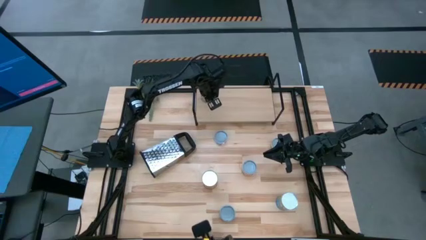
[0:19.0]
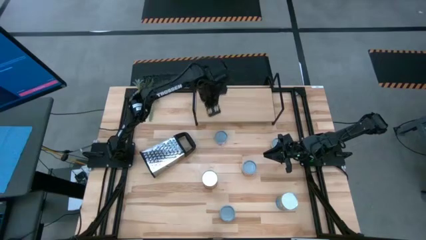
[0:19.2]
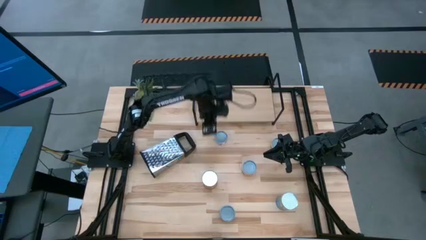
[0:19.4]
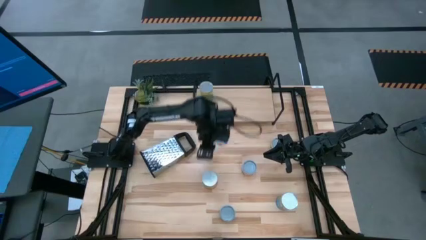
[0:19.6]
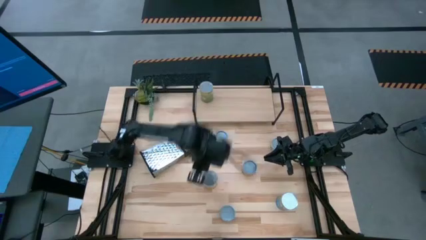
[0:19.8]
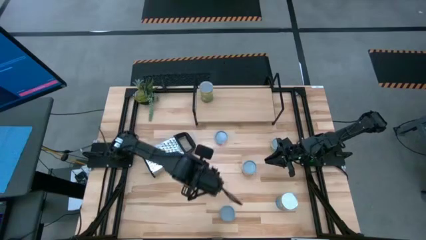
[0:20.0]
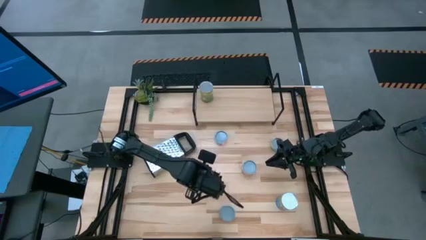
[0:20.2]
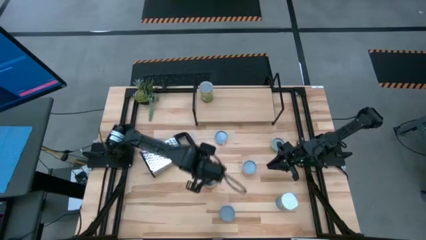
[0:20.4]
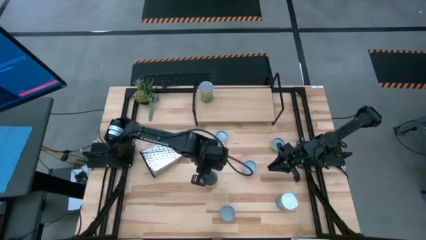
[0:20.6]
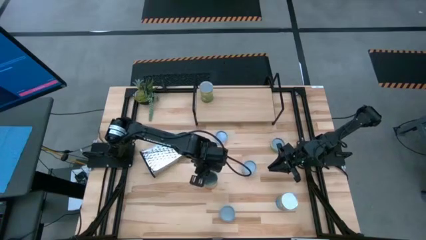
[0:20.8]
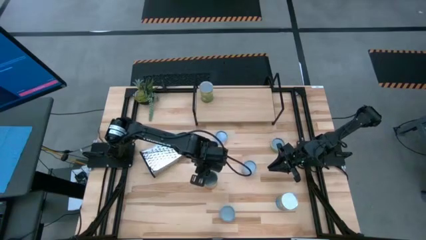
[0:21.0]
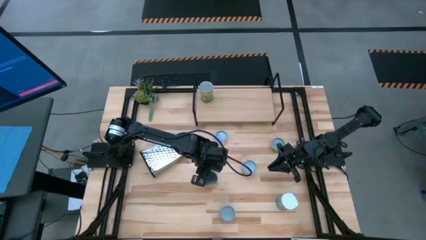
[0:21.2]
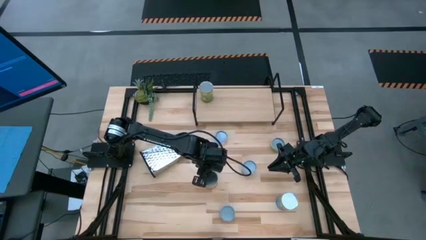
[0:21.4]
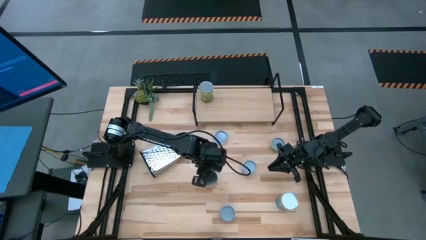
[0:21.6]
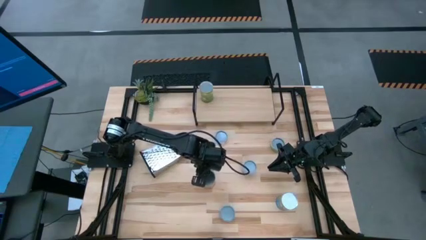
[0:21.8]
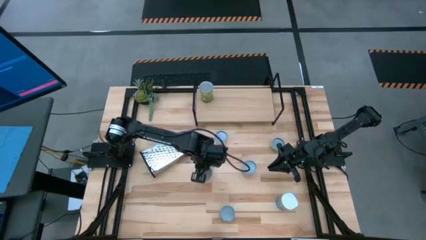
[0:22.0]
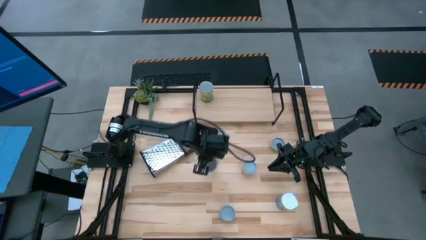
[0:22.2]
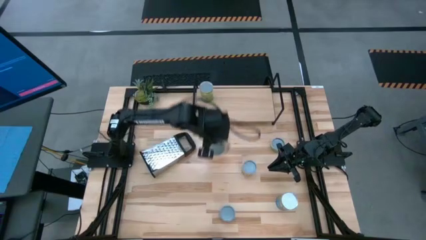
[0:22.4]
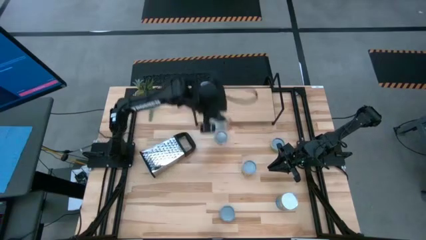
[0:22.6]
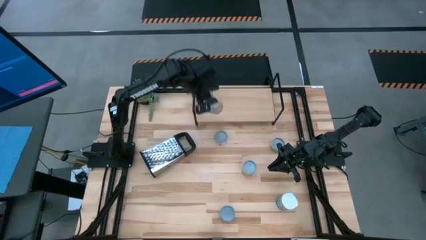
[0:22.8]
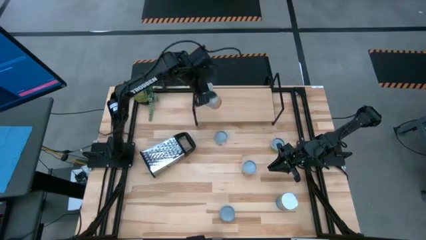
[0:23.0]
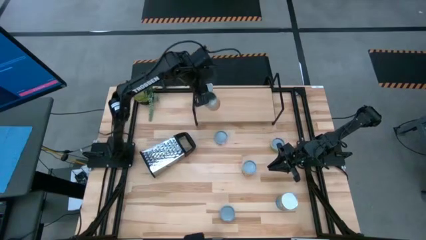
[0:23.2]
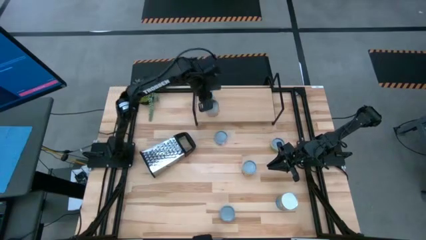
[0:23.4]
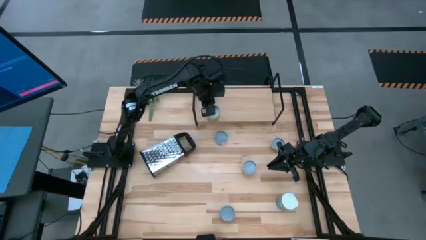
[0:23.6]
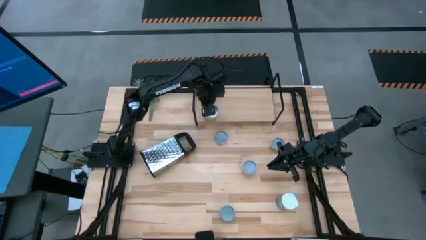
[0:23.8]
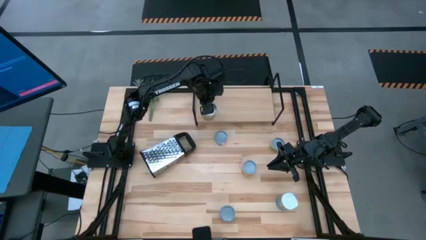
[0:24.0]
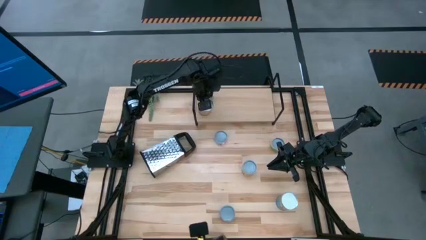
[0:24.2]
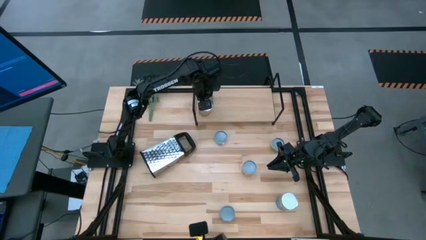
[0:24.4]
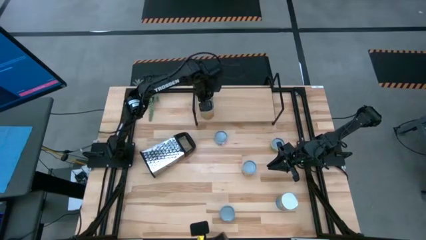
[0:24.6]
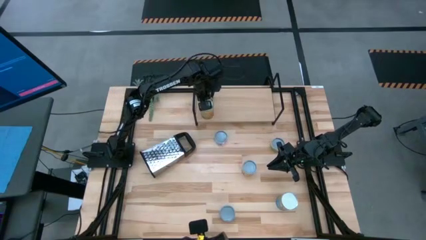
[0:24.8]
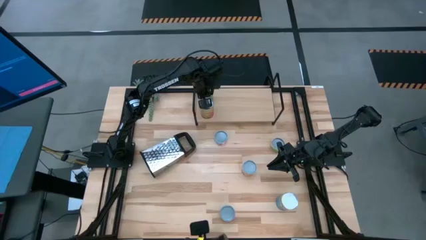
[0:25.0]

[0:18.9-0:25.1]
Task: Pick and place cans onto a shelf
Put the canned green beans on the shelf

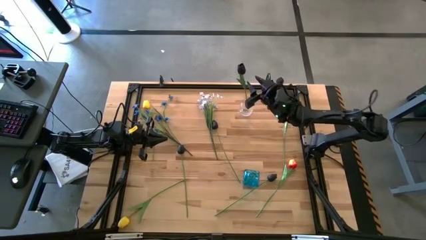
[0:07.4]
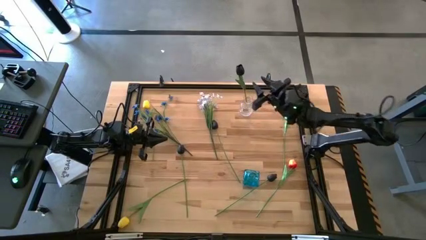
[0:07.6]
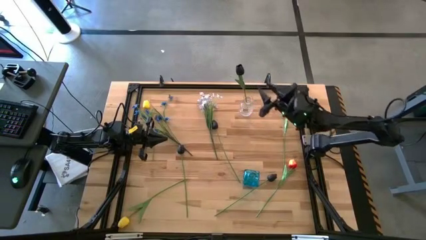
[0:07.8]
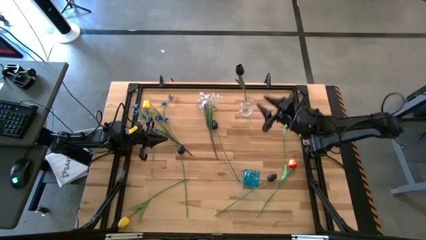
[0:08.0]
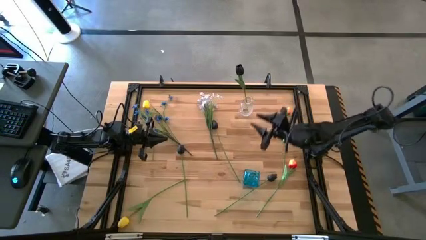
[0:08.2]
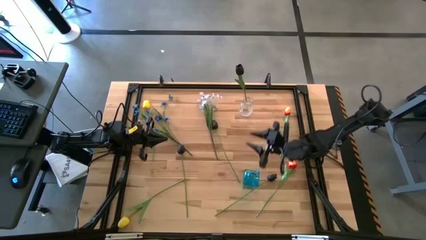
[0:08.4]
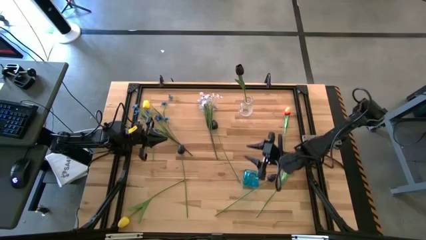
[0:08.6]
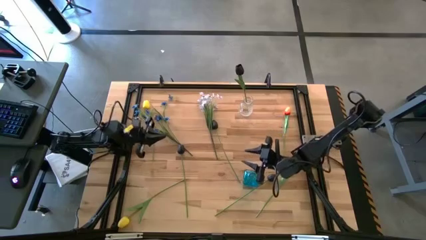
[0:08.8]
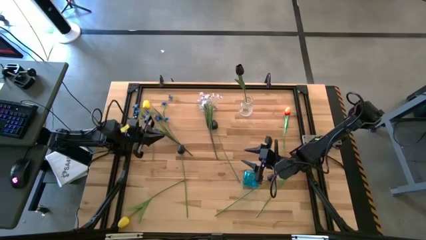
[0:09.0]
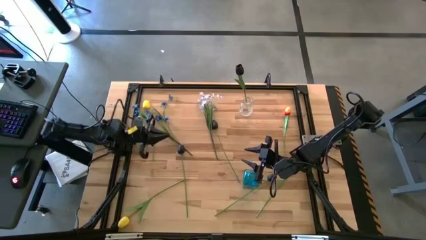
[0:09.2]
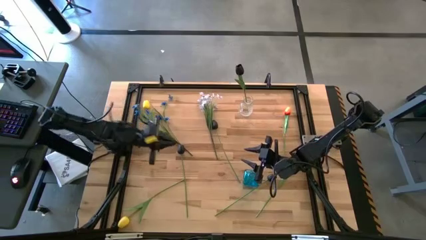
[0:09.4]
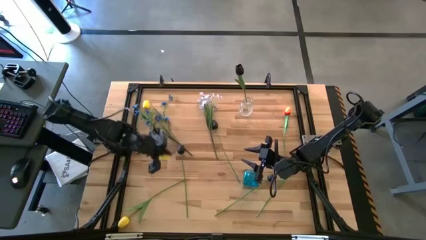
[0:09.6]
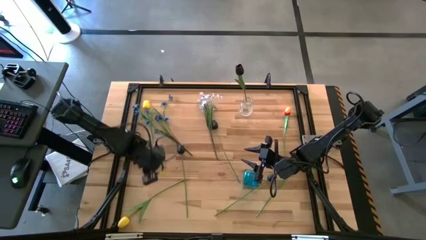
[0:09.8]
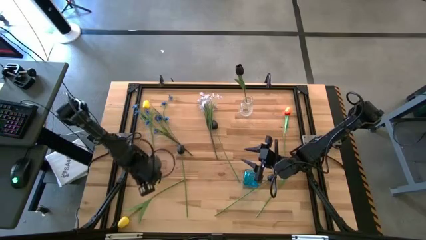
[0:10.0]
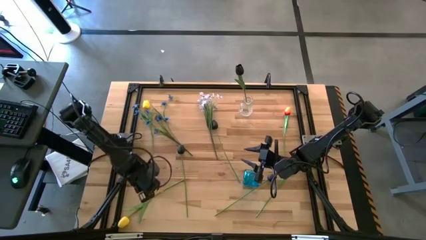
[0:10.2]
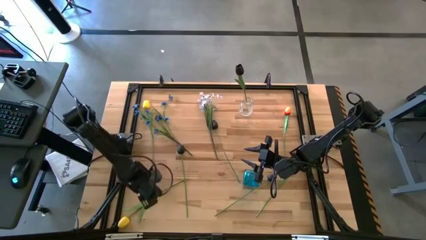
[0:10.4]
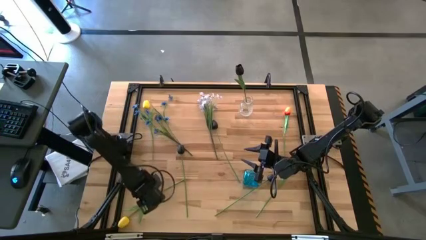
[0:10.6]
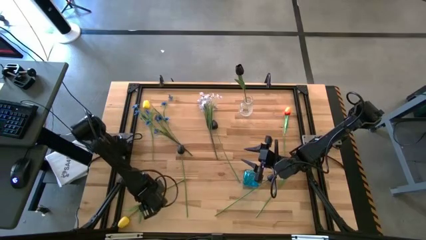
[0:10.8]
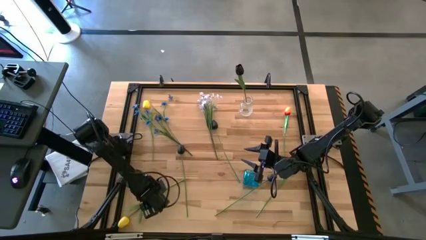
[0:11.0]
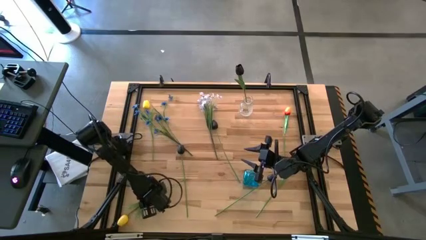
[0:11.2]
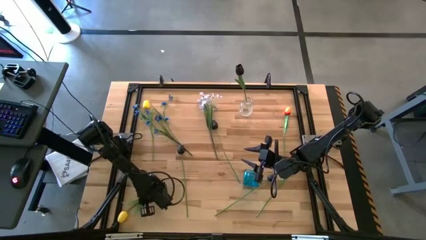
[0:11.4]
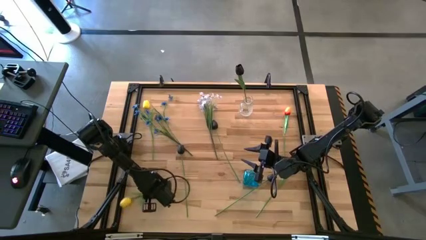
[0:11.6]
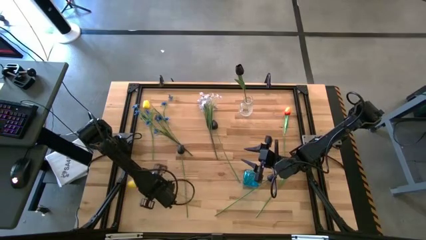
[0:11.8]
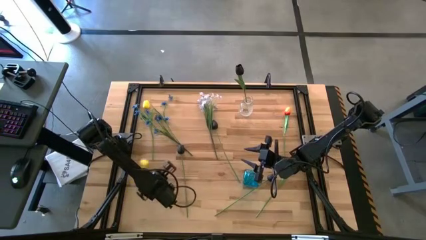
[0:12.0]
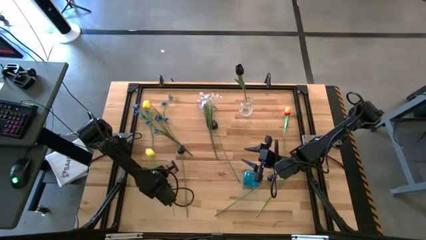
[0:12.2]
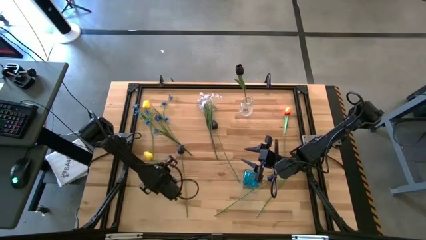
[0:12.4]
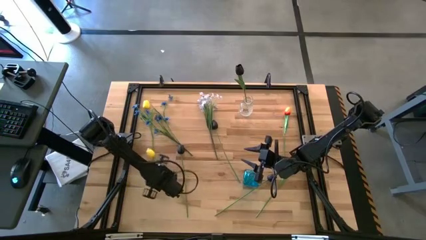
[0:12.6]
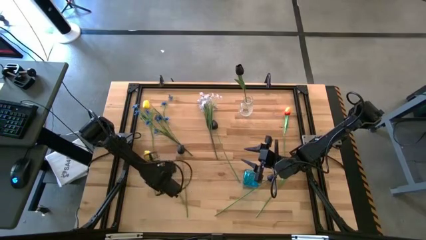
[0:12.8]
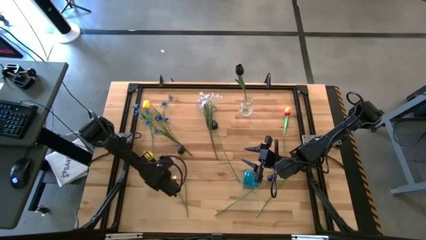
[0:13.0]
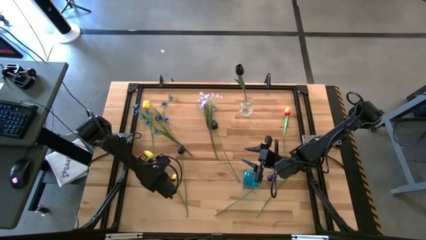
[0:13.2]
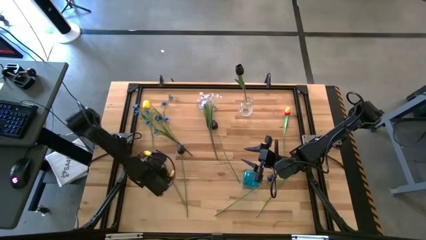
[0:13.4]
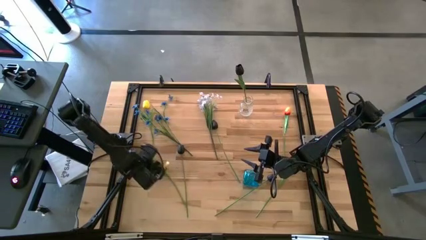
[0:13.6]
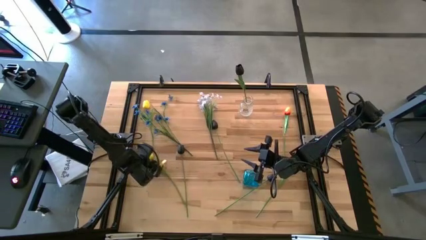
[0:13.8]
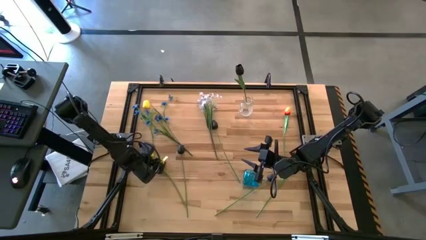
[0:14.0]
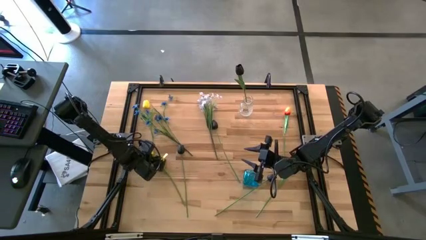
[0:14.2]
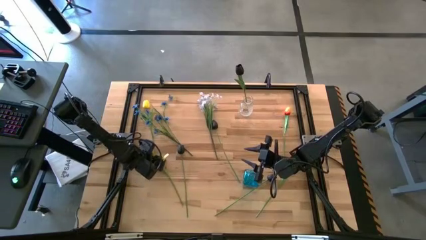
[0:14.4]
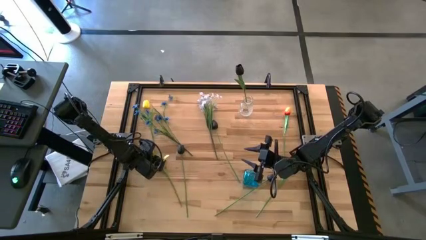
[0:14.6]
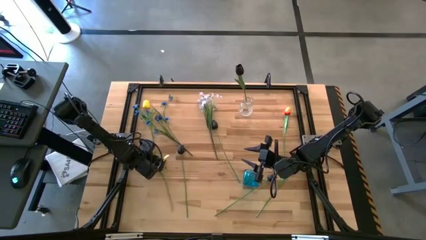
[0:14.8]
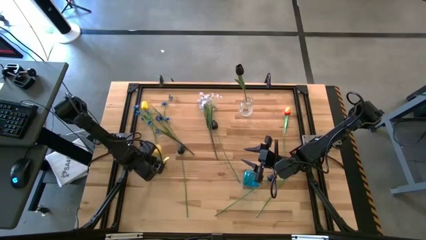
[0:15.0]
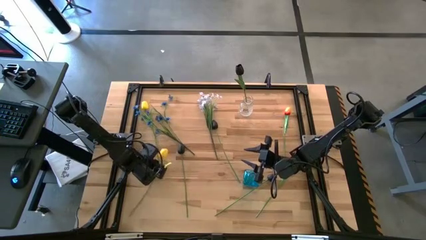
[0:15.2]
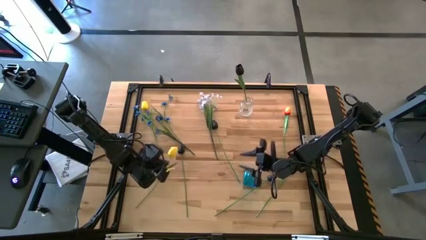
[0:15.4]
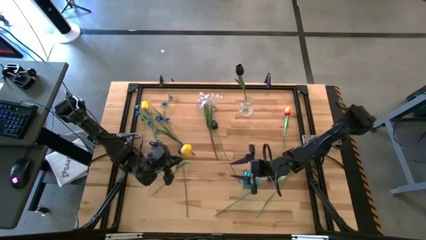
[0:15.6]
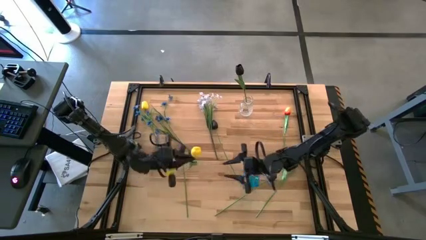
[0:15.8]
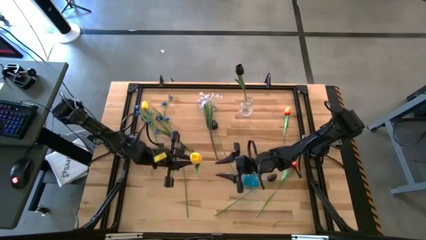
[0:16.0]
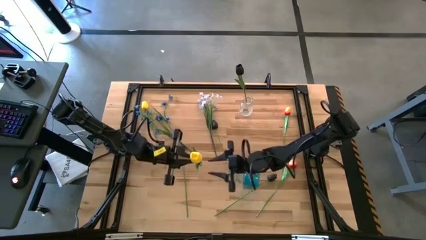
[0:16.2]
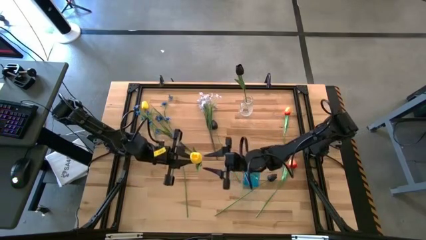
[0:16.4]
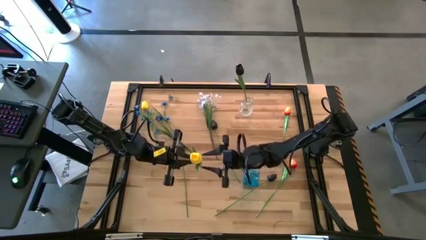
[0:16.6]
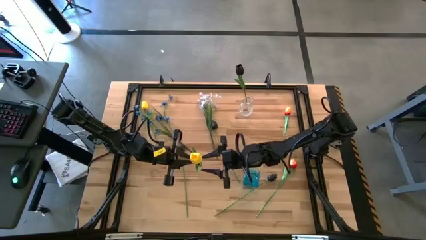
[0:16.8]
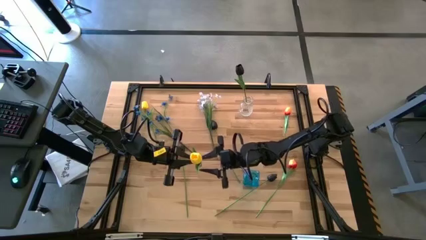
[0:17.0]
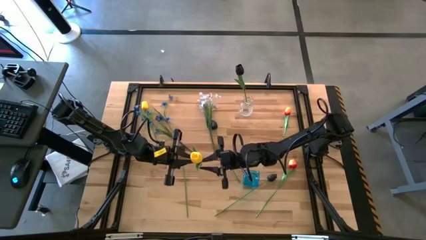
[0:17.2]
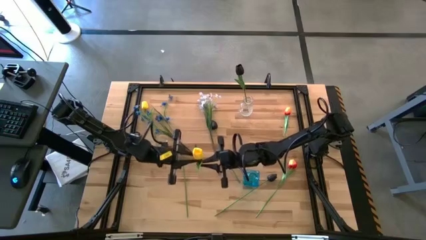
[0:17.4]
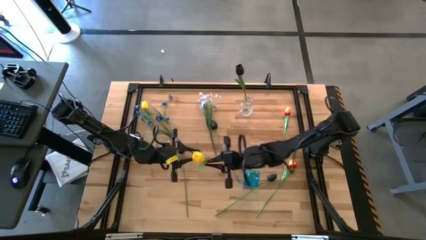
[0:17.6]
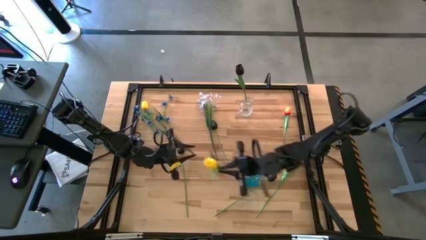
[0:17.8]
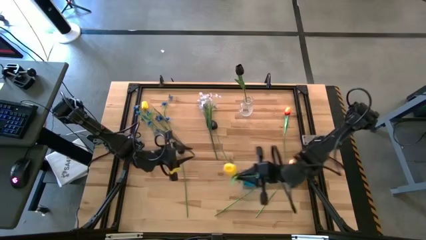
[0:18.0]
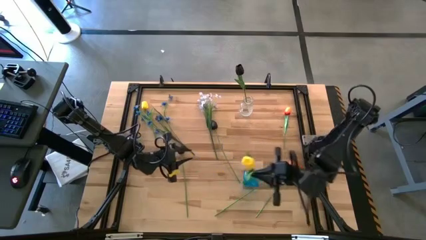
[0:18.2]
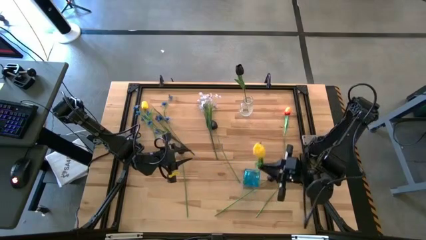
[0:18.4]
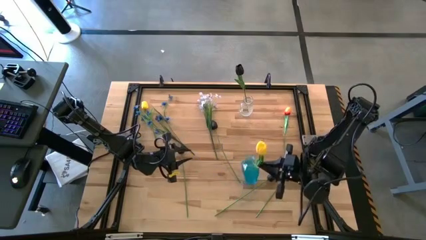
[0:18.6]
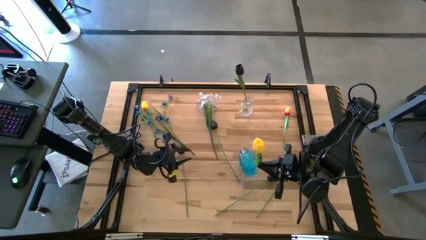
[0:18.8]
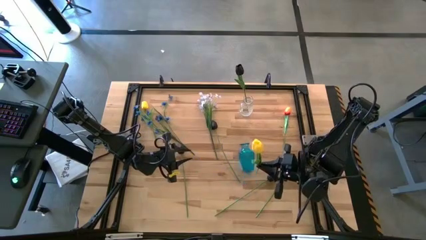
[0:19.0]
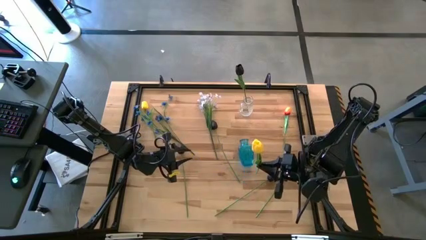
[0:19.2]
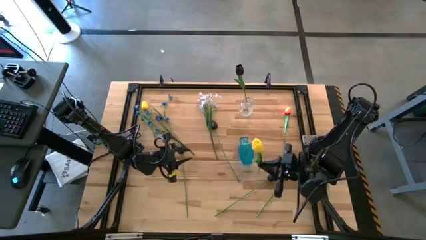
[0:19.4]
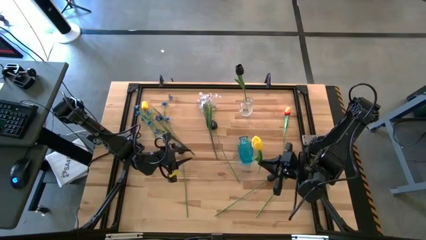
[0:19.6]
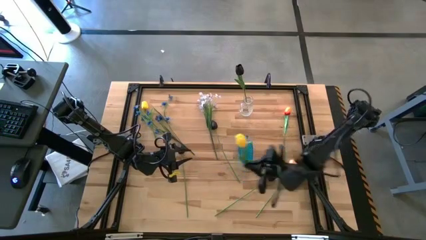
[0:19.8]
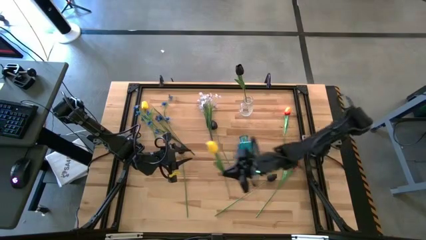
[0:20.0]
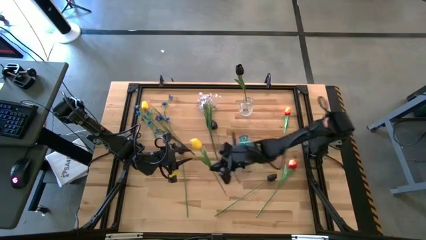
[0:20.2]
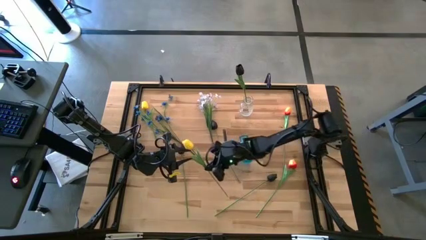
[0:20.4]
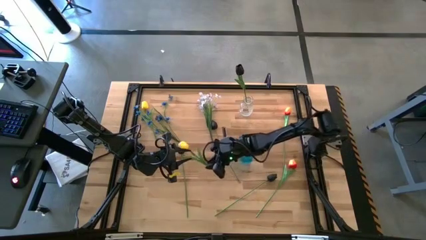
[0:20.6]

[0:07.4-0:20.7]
Task: Sort flowers into vase by color
Put the yellow tulip into the blue flower vase
